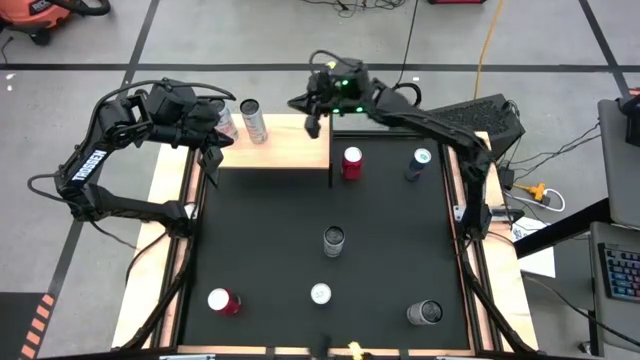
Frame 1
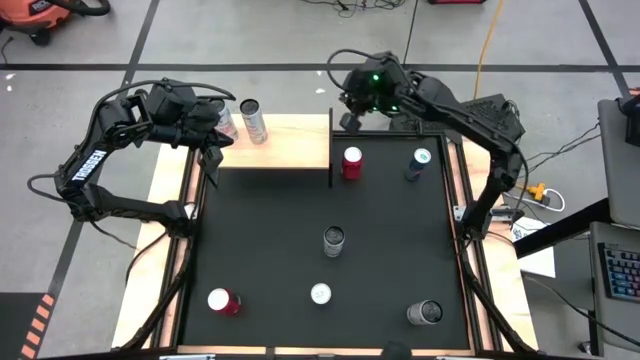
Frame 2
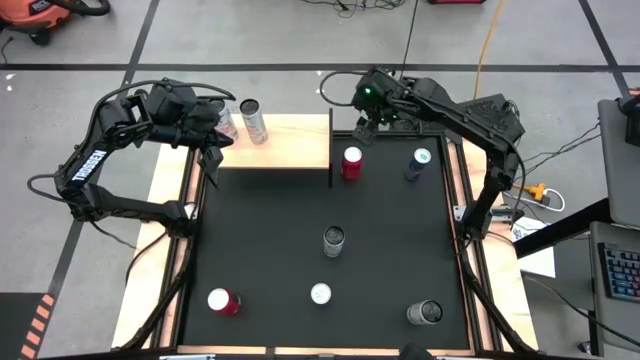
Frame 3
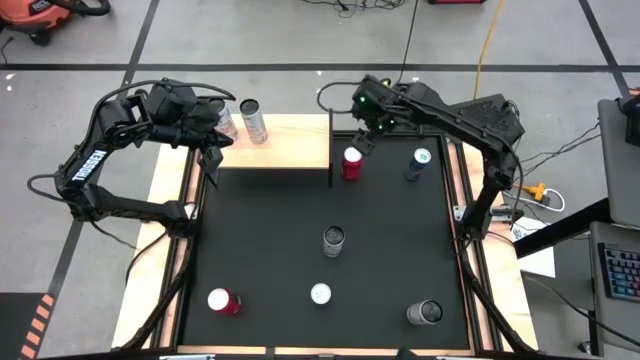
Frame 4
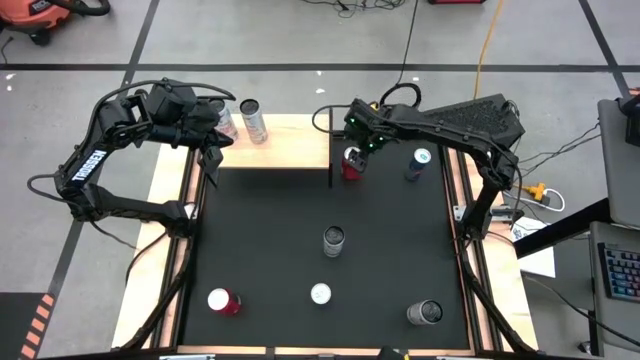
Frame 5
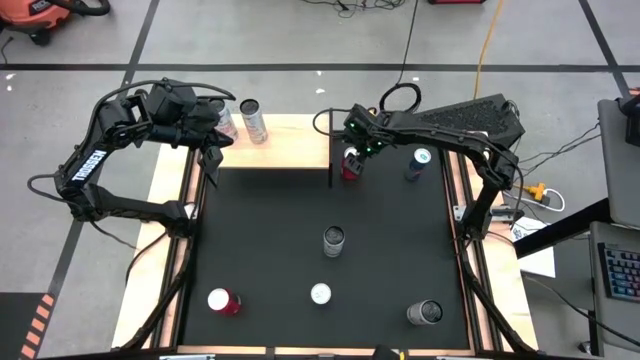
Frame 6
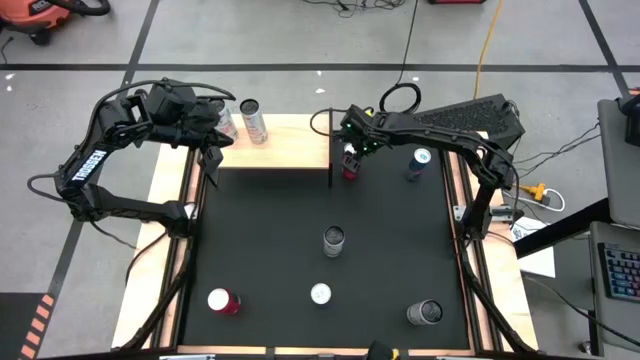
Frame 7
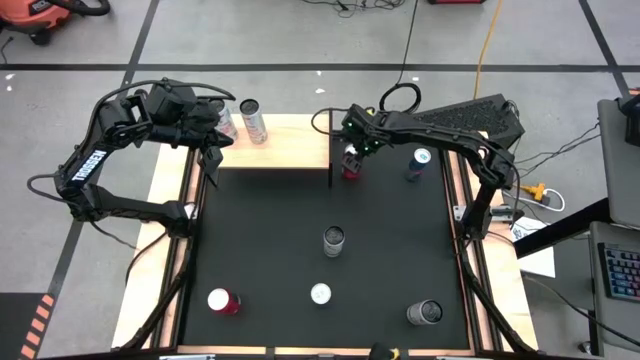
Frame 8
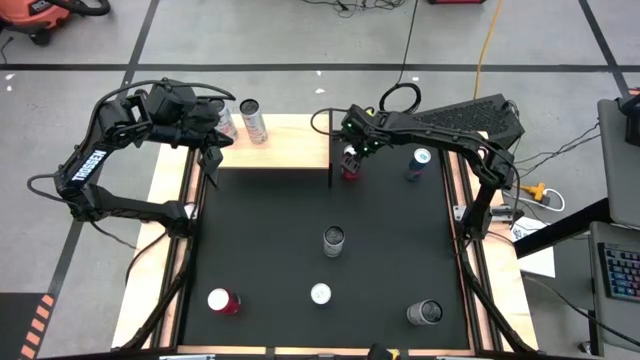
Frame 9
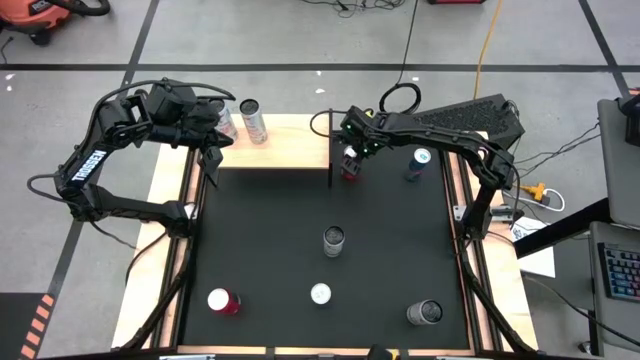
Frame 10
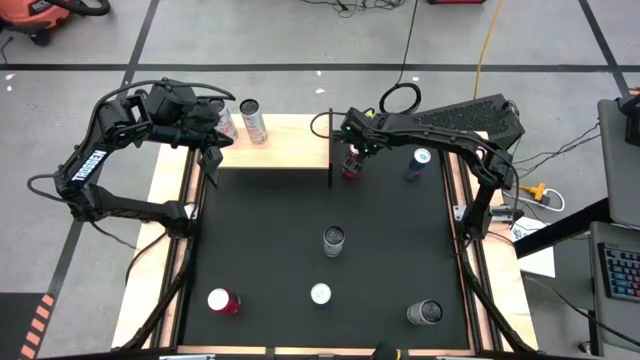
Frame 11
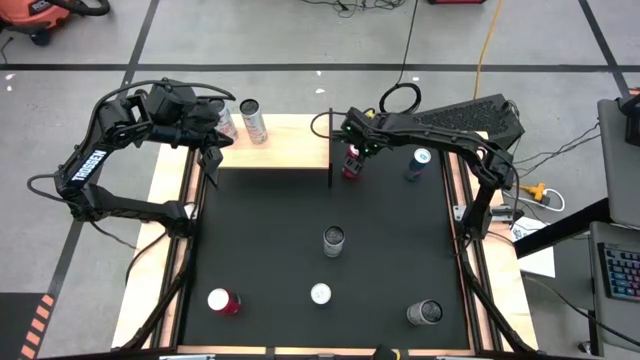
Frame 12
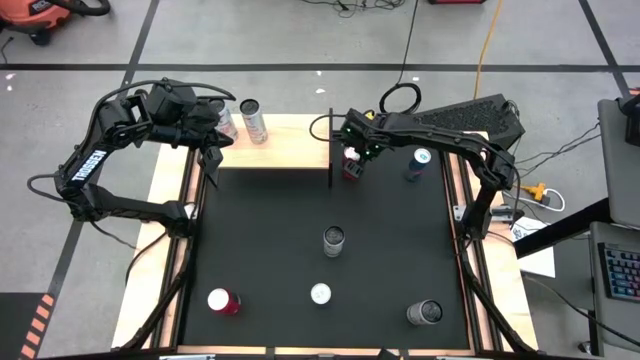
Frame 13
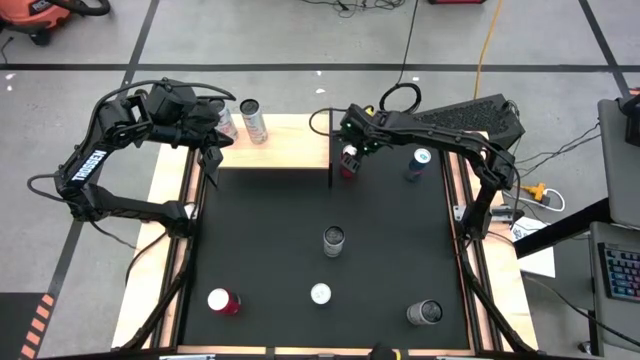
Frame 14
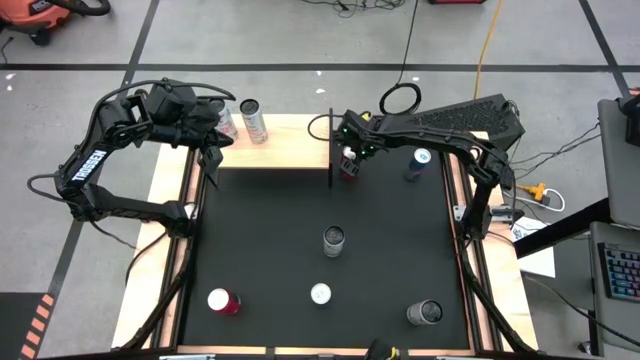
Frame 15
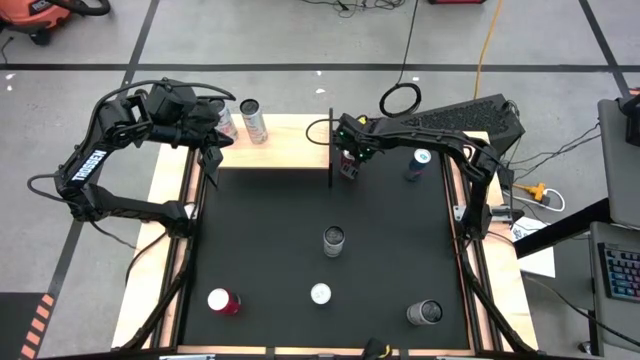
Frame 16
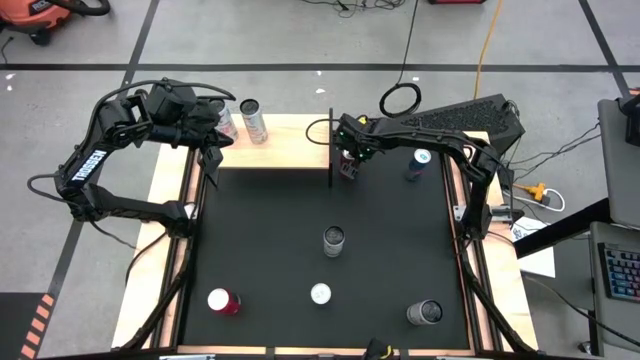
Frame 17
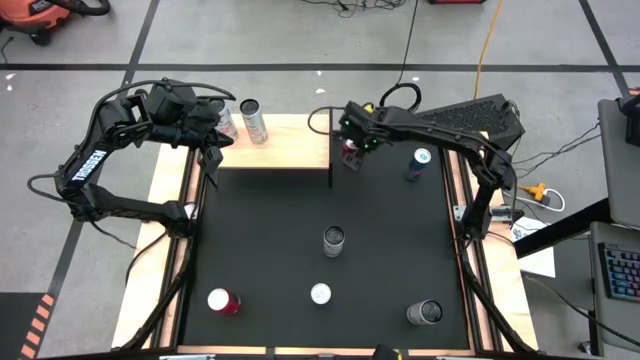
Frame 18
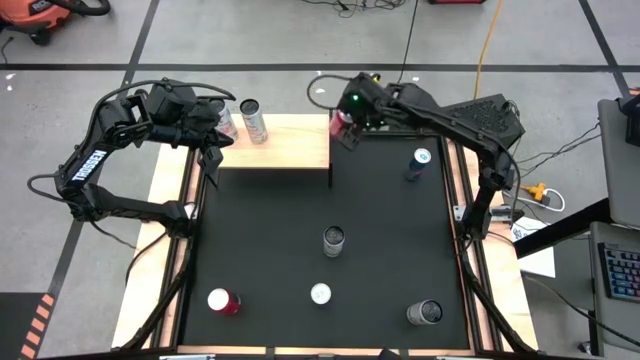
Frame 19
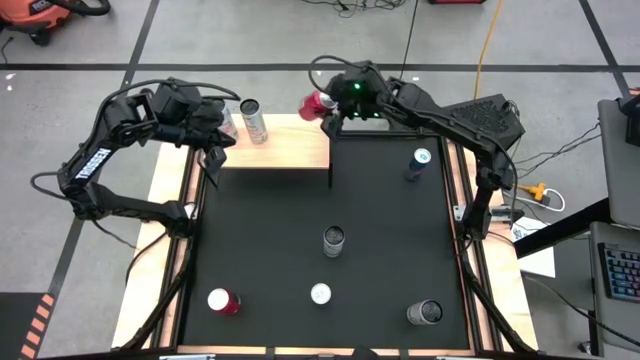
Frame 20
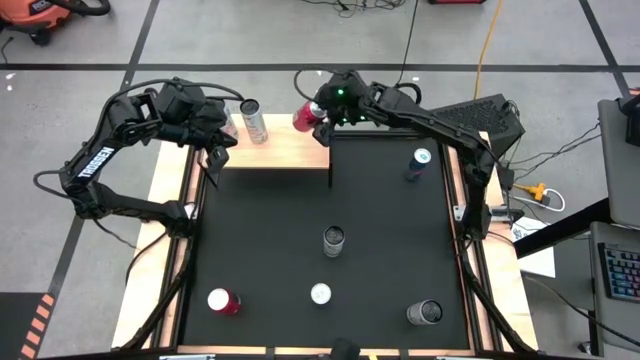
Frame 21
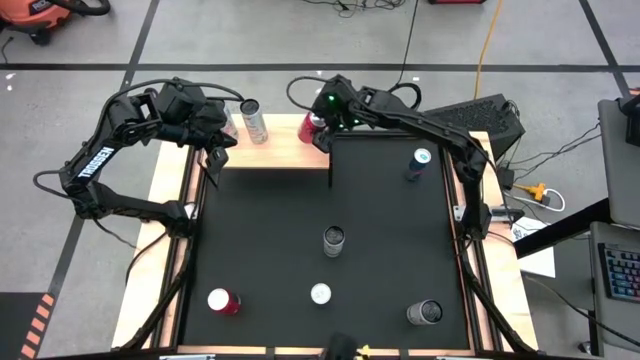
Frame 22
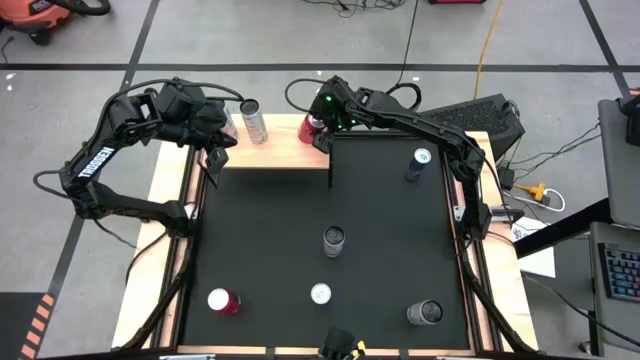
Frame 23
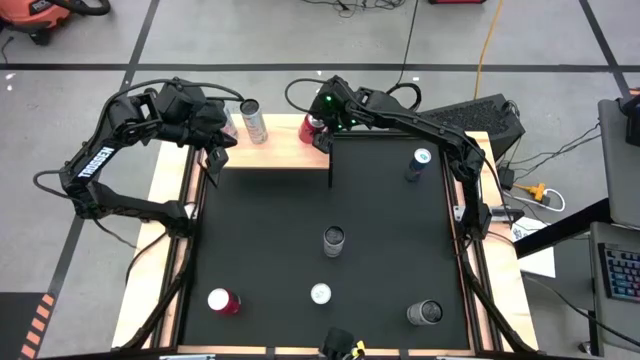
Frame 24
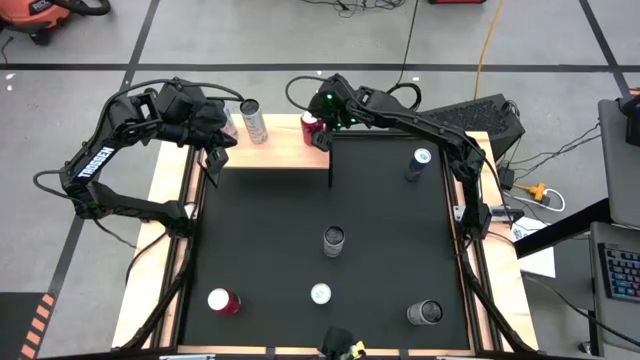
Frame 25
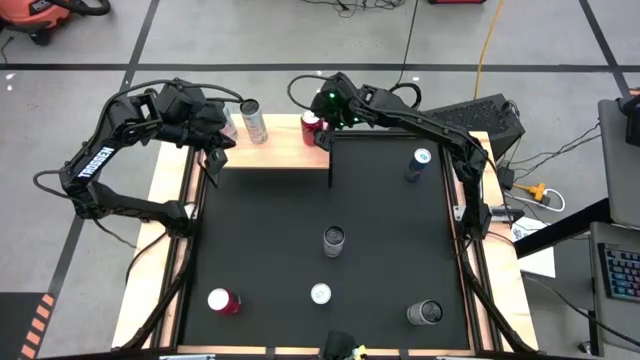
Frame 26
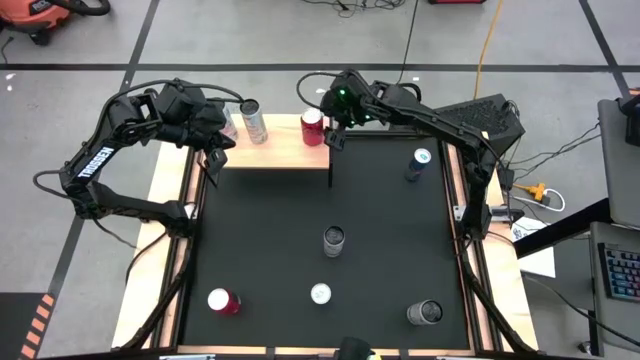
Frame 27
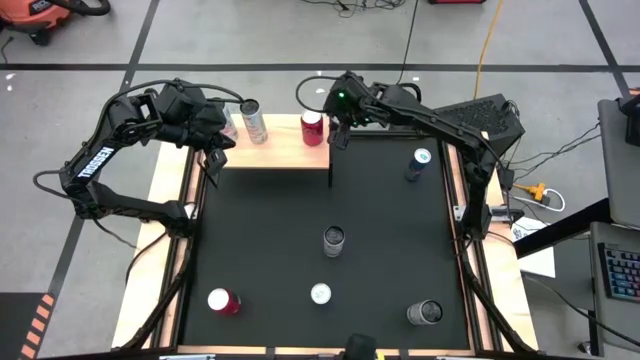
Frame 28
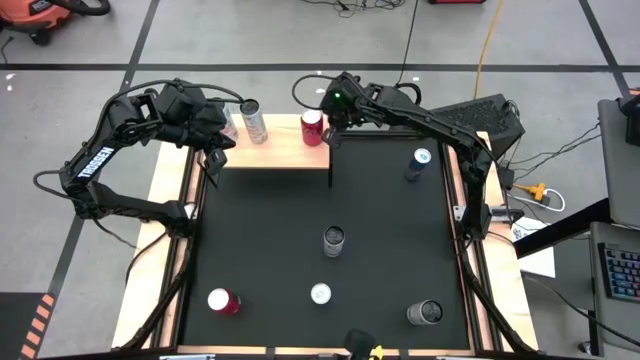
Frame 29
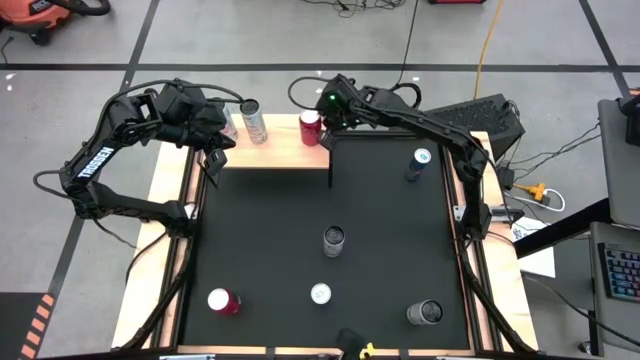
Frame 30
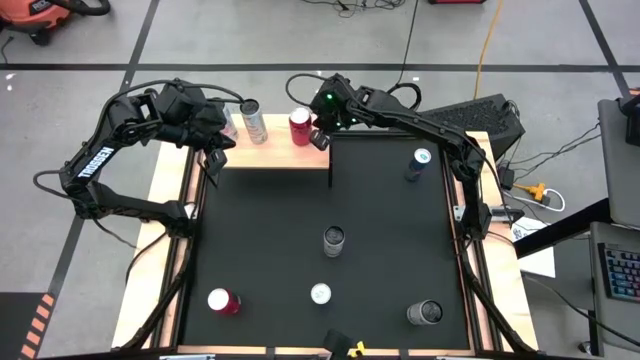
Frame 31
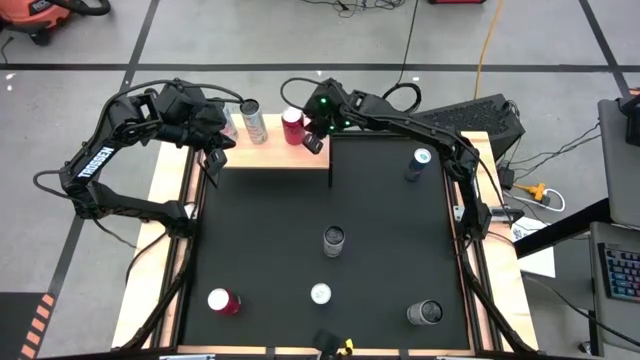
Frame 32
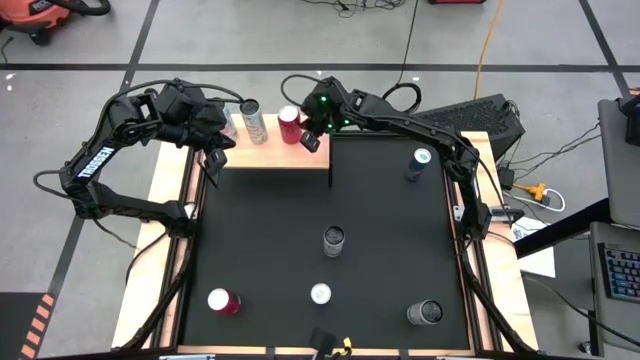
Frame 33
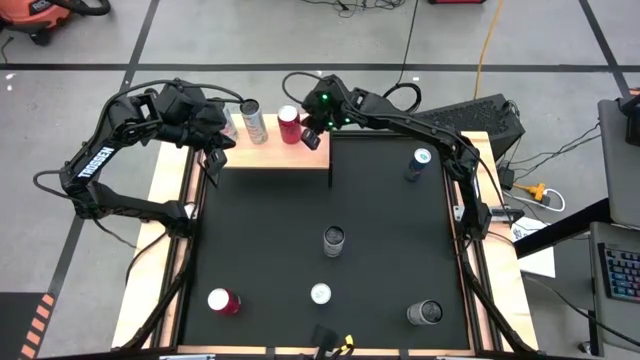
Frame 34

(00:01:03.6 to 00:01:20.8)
Task: Place canned beverage on shelf
Put the top red black soda can on the shelf

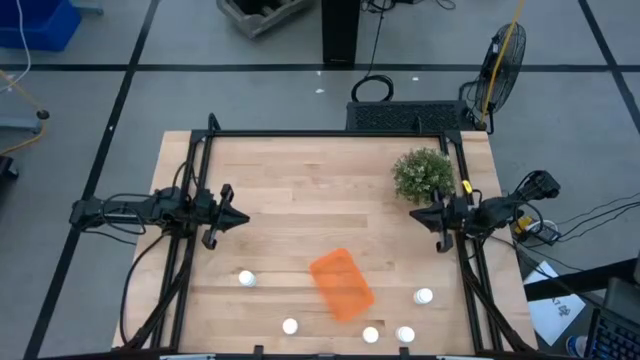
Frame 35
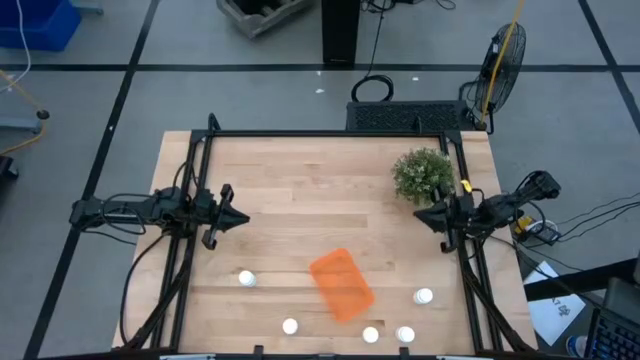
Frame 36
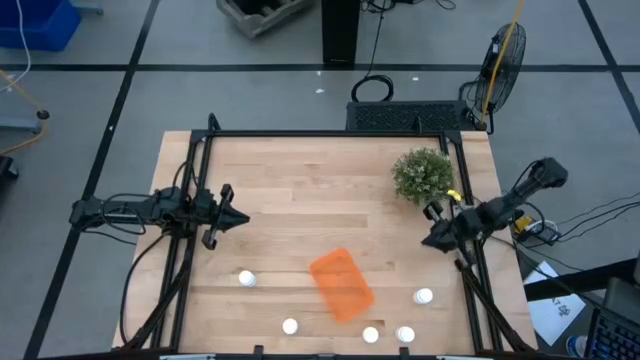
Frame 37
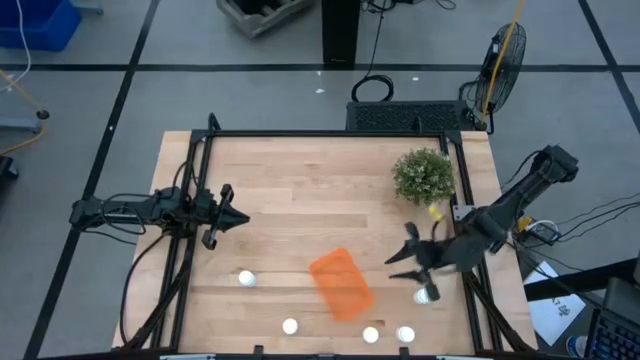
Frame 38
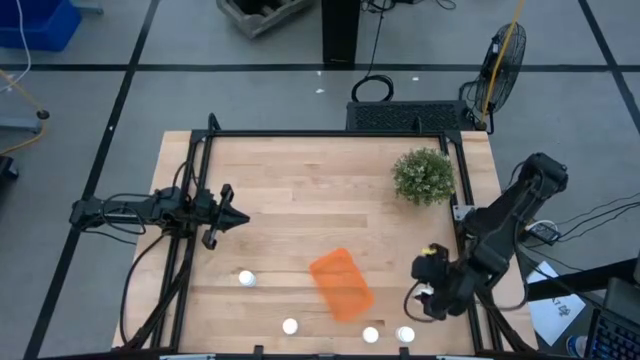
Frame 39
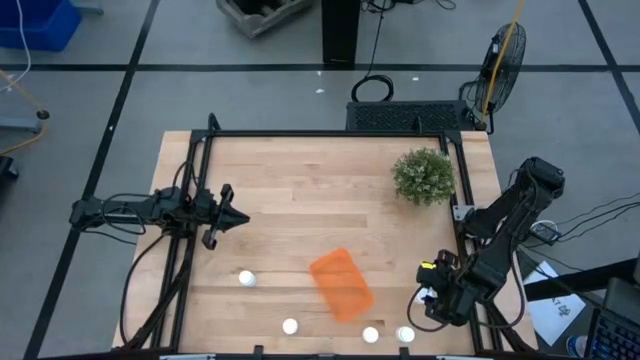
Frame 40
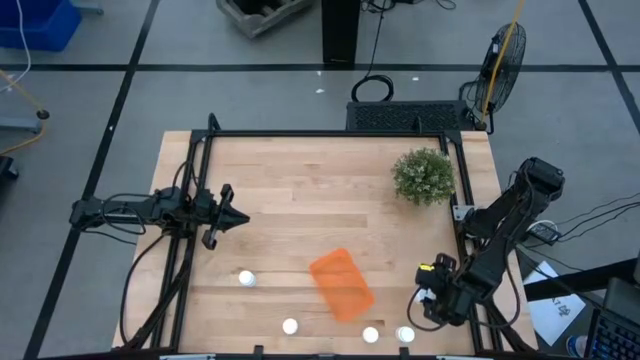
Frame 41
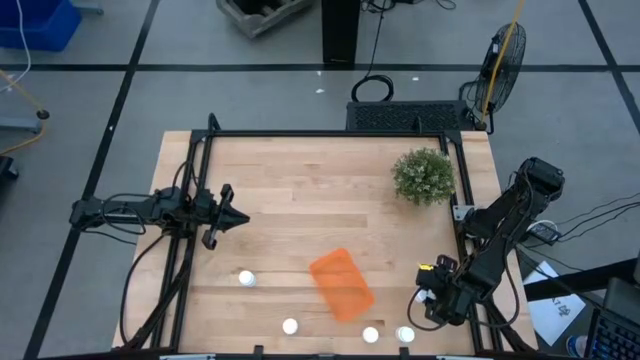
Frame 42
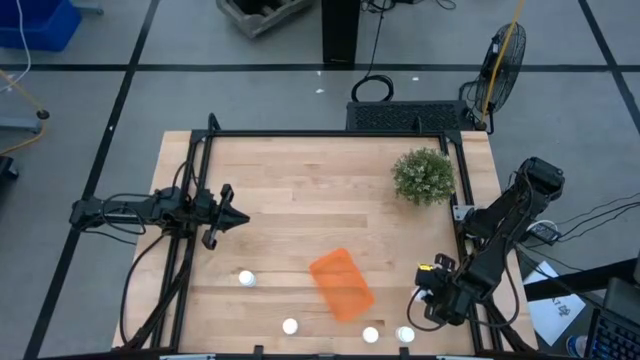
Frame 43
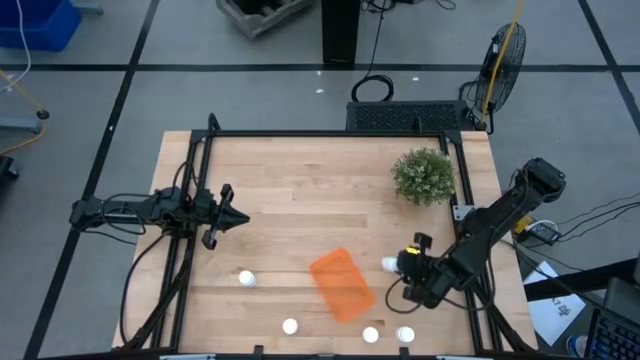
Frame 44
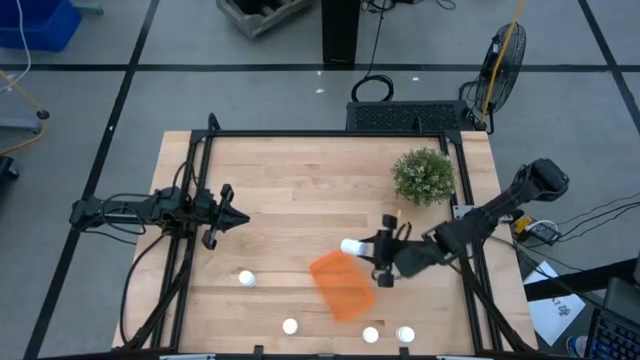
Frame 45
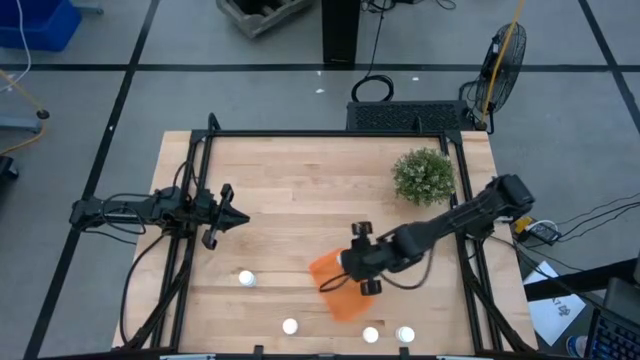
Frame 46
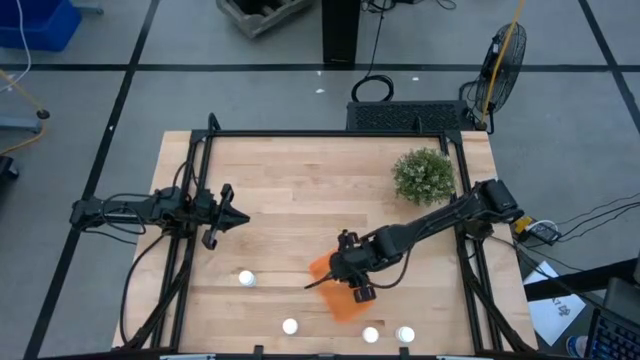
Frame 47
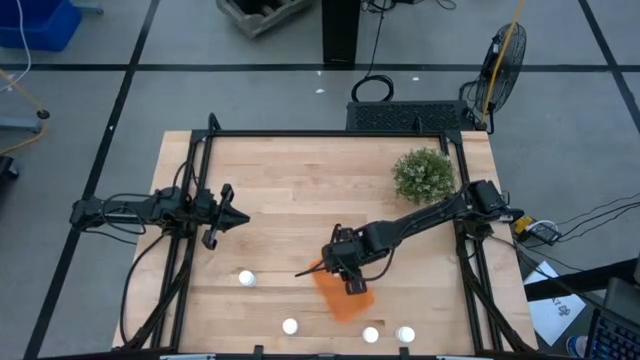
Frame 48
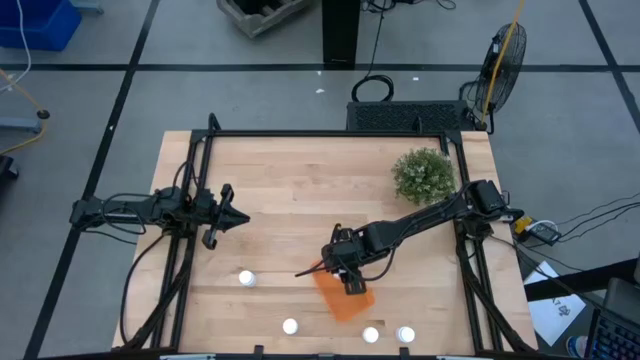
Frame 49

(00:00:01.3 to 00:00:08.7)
Task: Pick and place pill bottles into a basket
Put the white pill bottle into the orange bin
